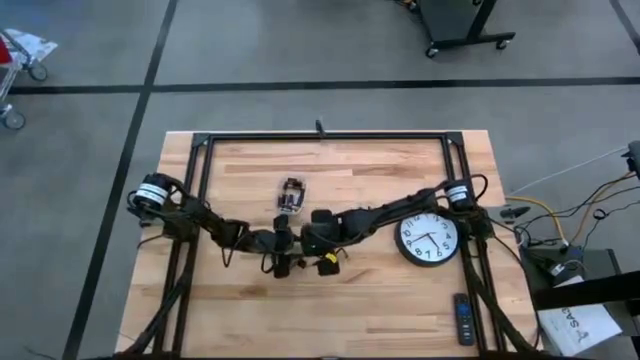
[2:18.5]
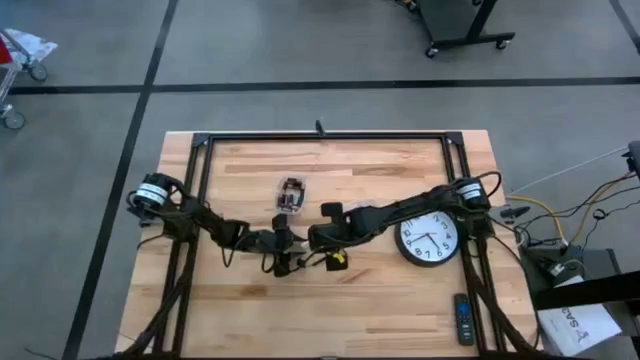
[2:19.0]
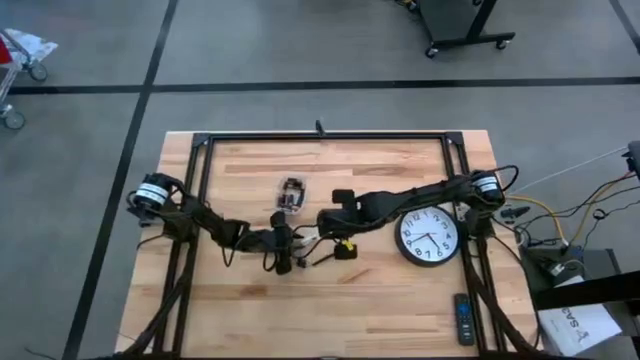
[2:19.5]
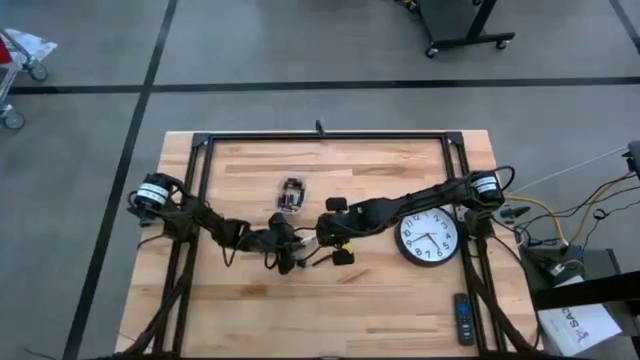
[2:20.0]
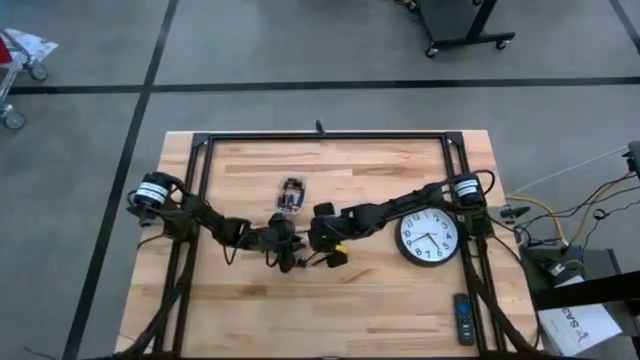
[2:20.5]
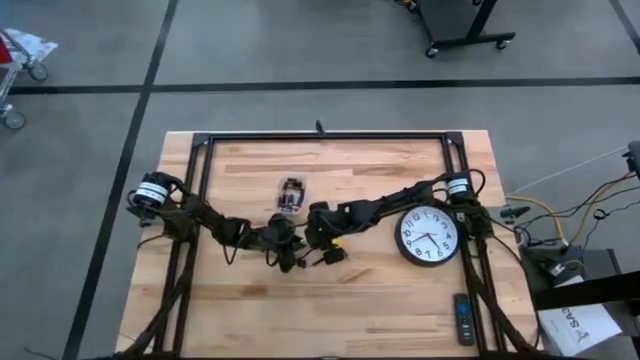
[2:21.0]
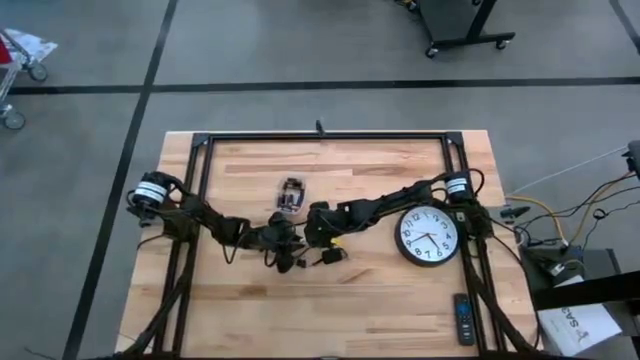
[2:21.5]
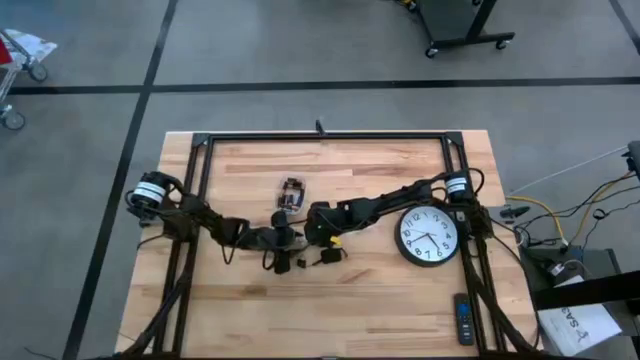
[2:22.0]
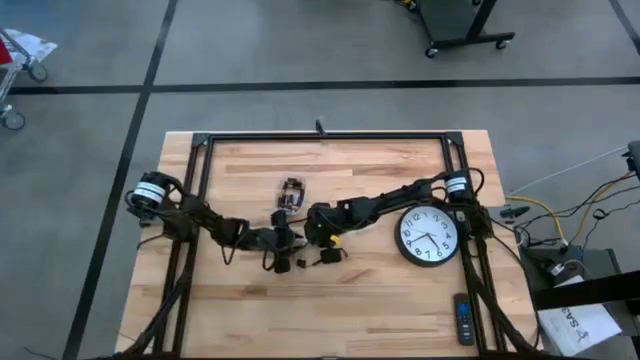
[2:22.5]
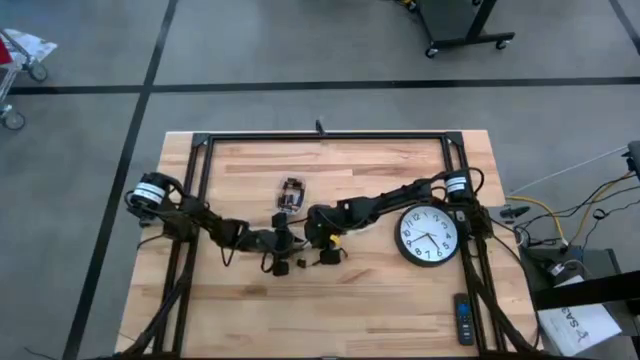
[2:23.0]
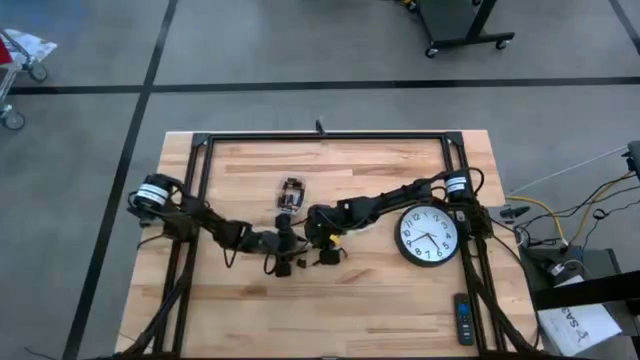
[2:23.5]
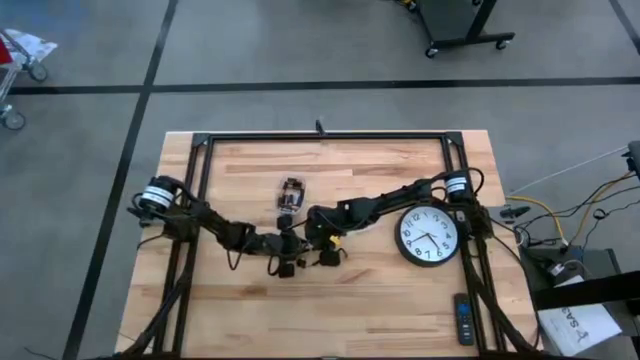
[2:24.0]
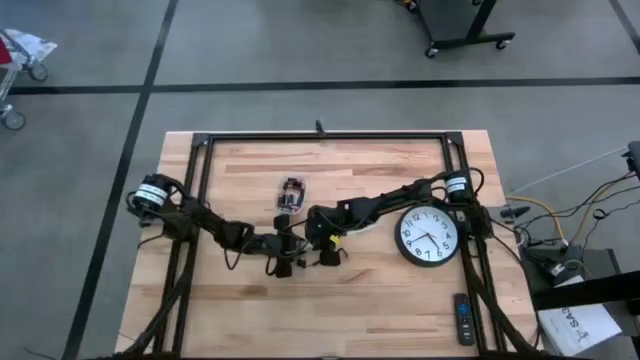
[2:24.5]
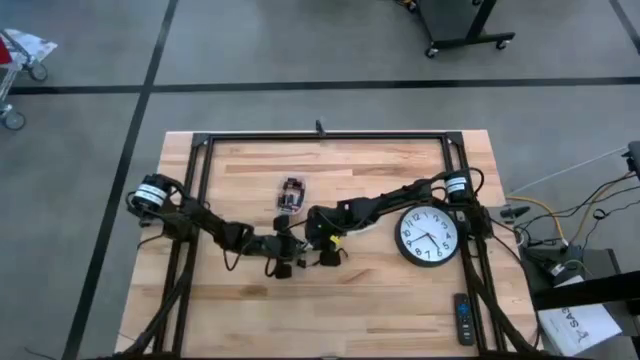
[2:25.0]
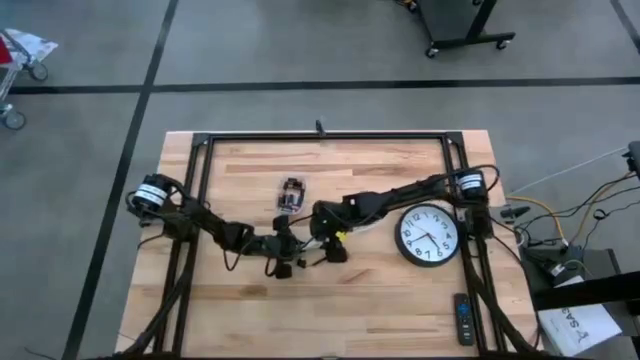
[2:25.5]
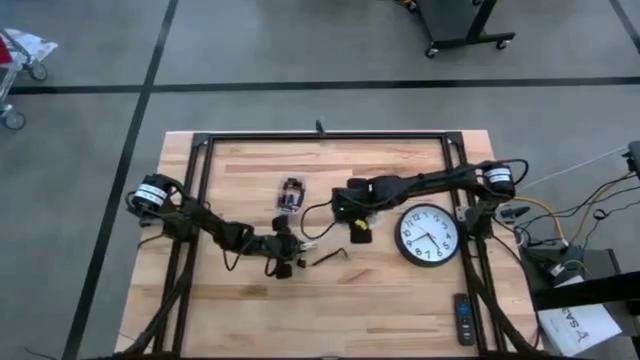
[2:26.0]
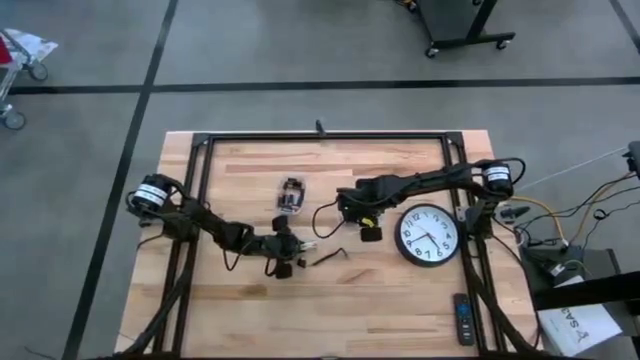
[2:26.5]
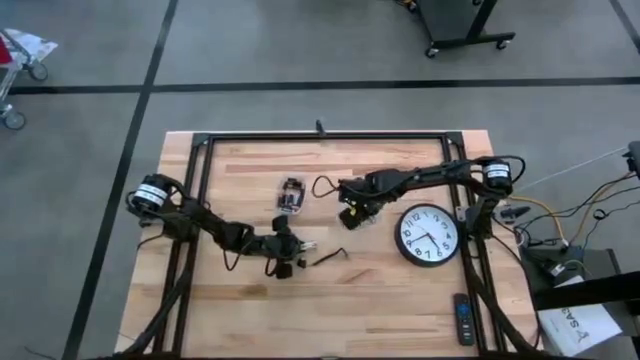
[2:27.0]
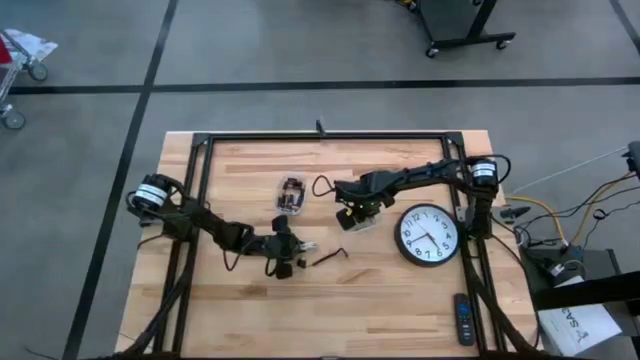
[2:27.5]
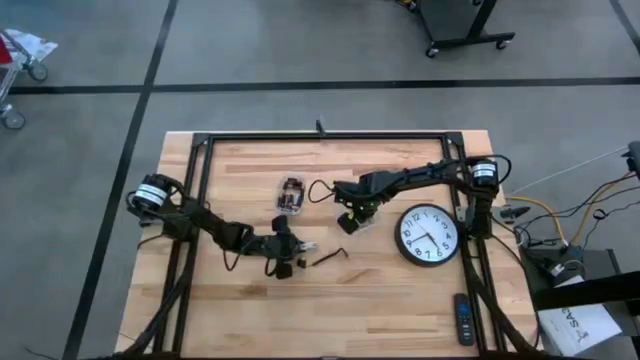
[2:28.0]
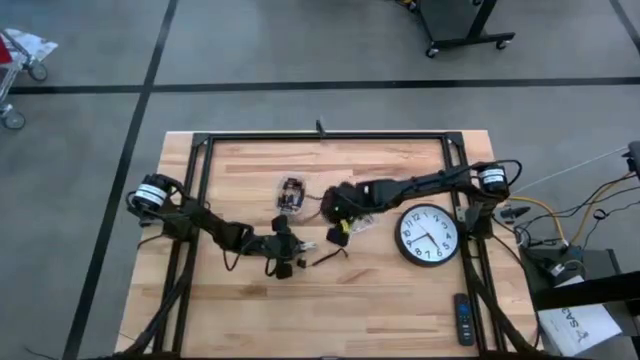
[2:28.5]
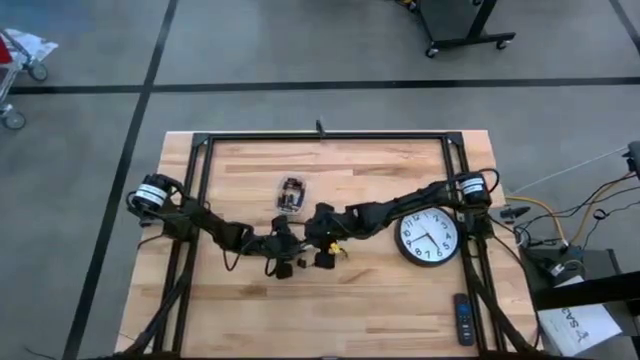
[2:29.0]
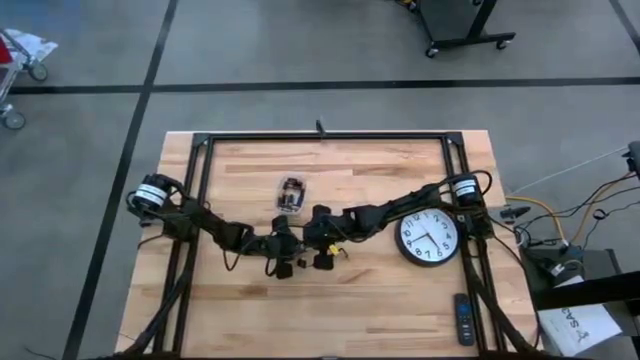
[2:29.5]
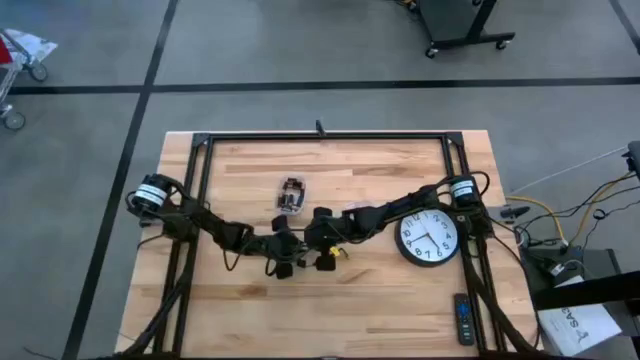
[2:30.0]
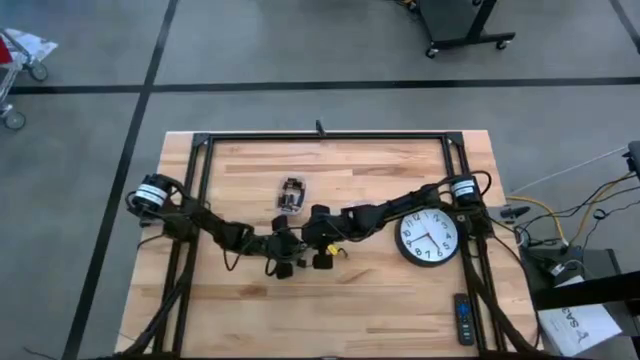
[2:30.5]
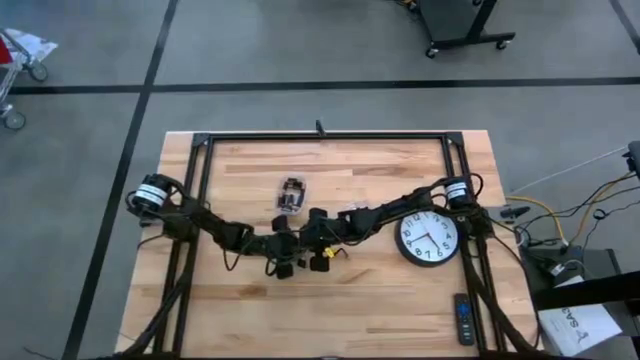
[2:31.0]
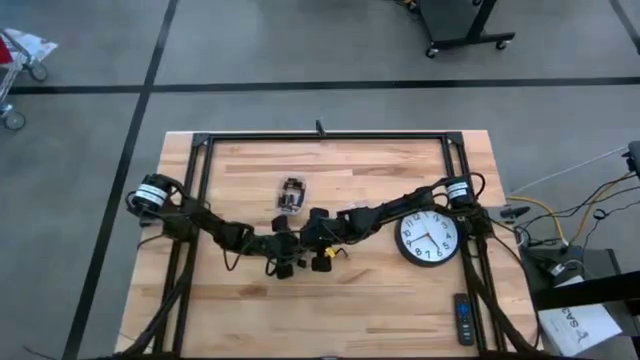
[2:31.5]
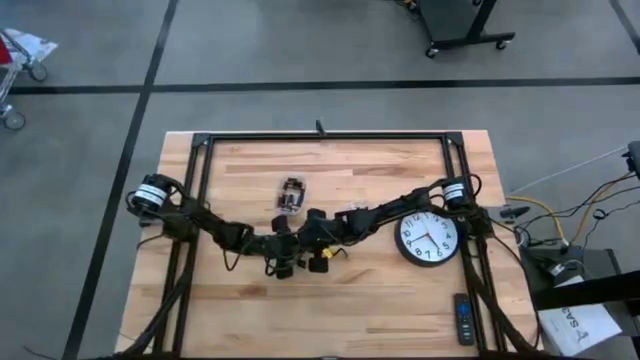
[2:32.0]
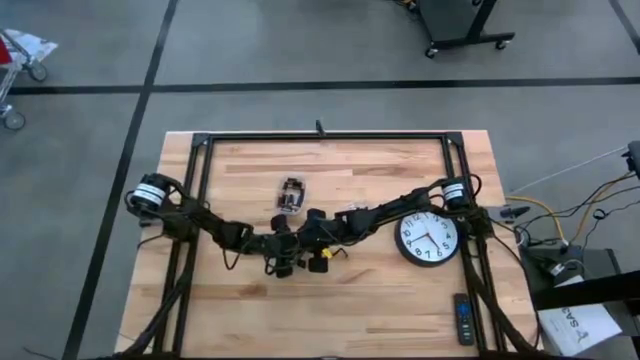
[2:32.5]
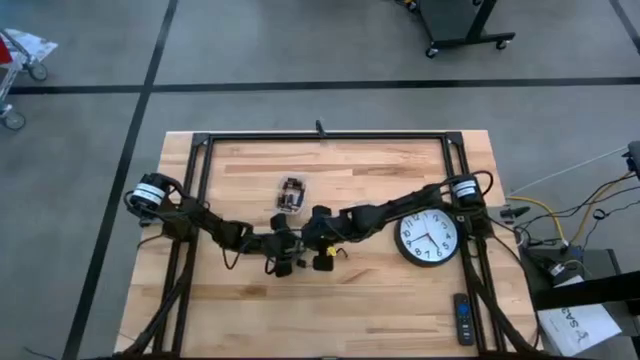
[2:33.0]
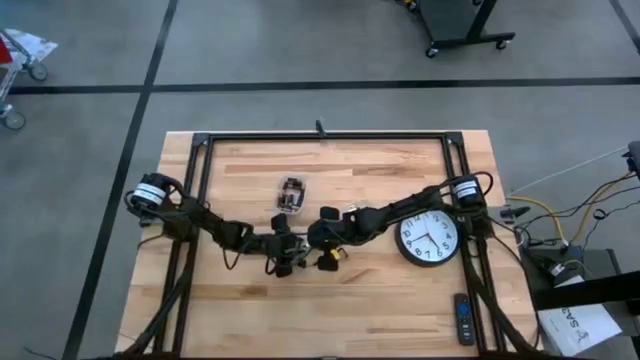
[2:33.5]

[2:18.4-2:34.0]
Task: Insert battery
Insert the silver battery into the flashlight's battery compartment

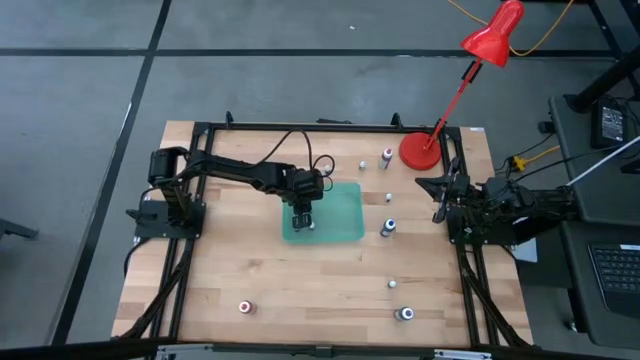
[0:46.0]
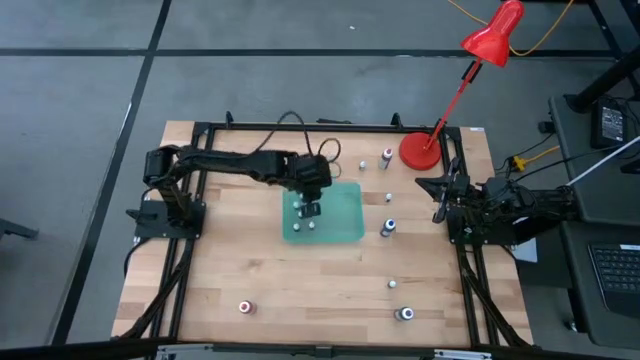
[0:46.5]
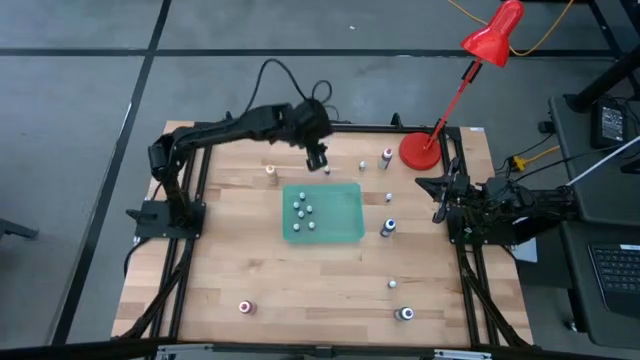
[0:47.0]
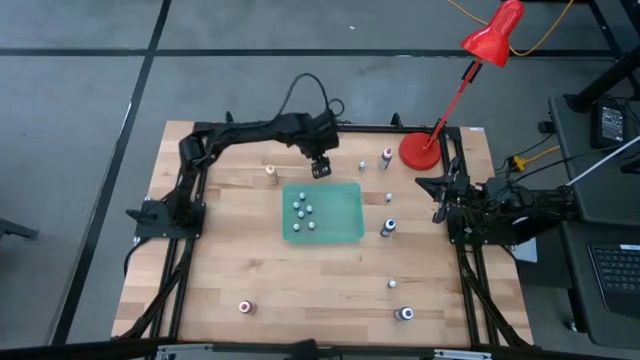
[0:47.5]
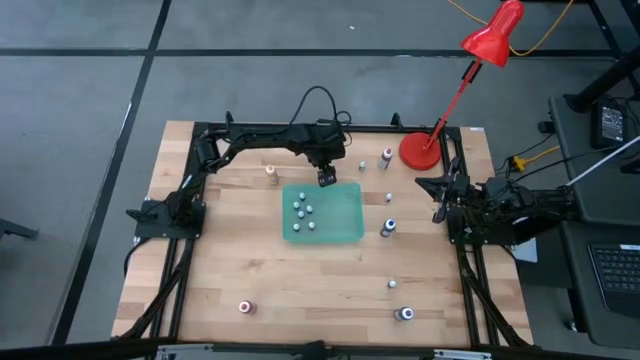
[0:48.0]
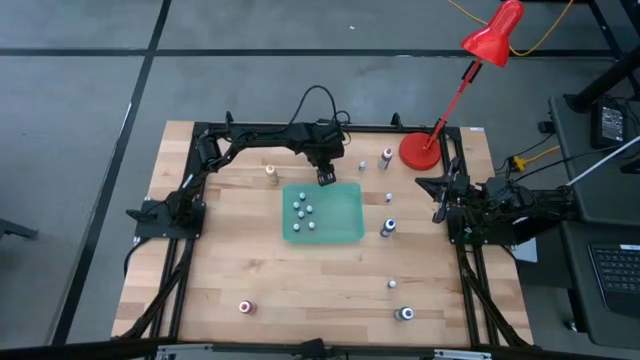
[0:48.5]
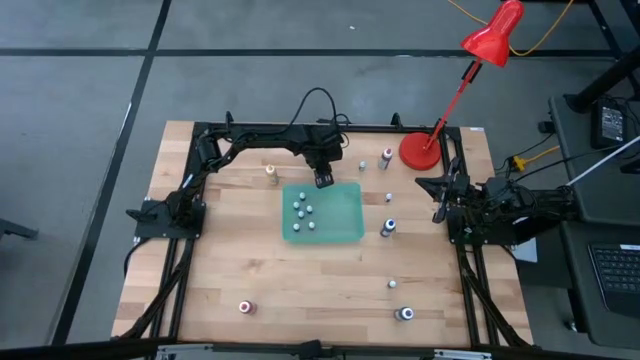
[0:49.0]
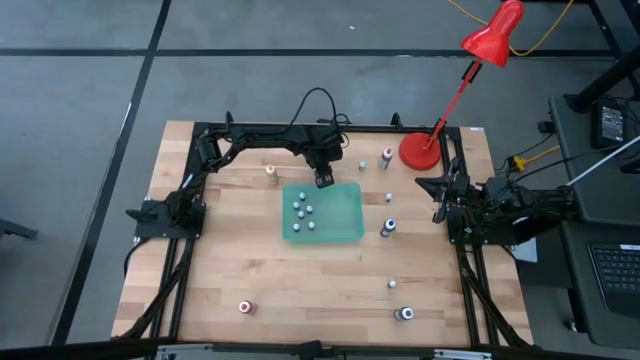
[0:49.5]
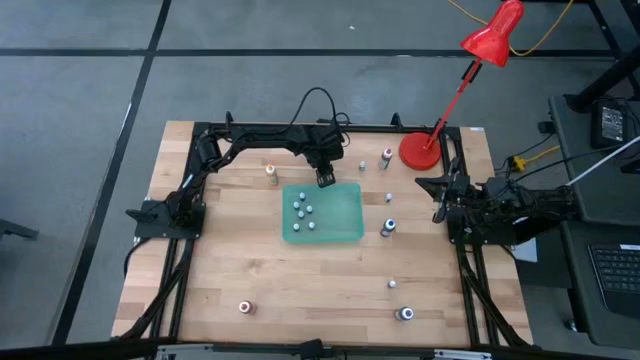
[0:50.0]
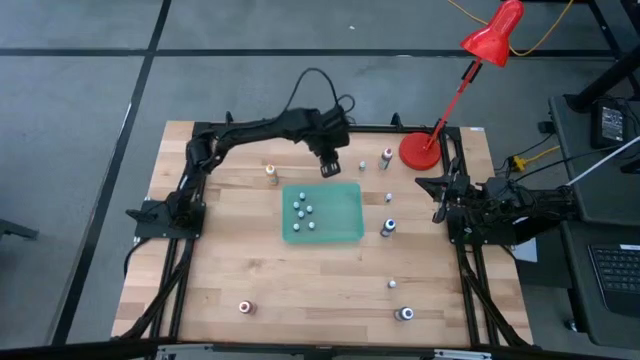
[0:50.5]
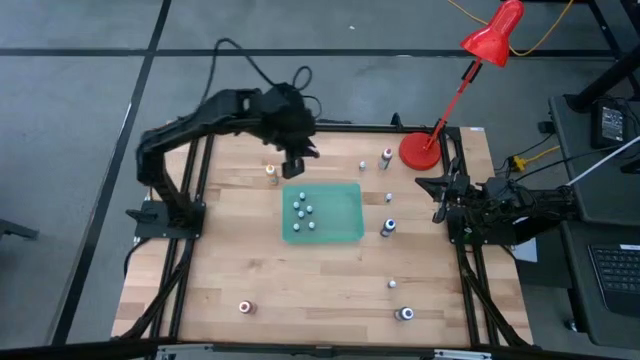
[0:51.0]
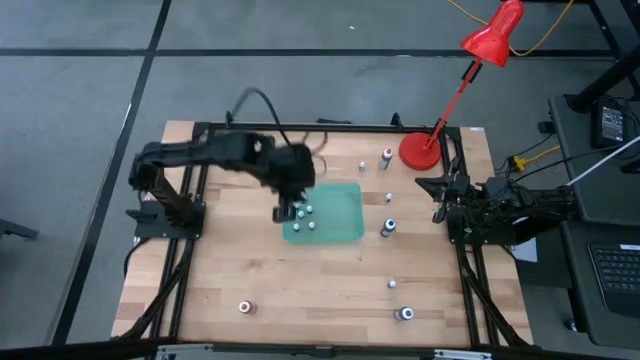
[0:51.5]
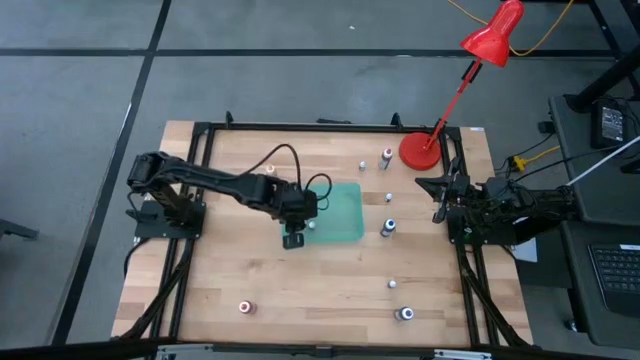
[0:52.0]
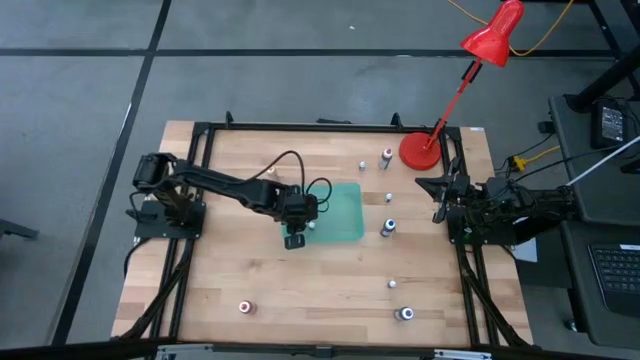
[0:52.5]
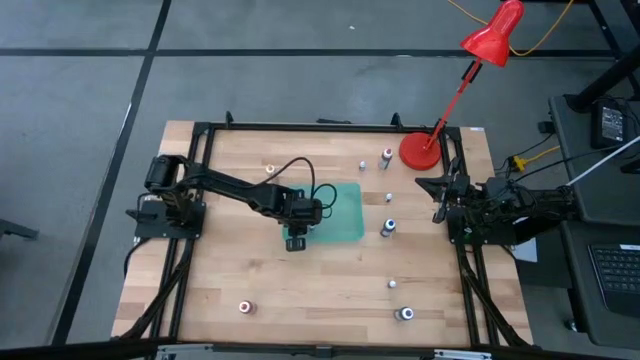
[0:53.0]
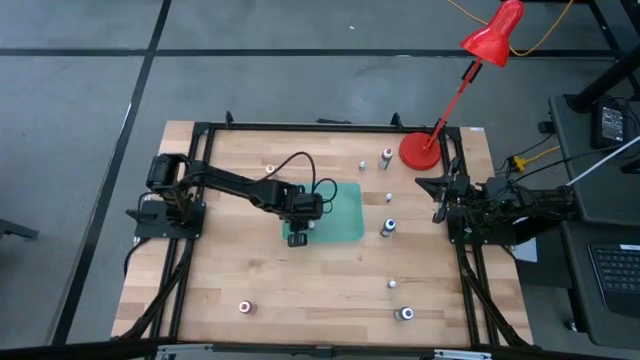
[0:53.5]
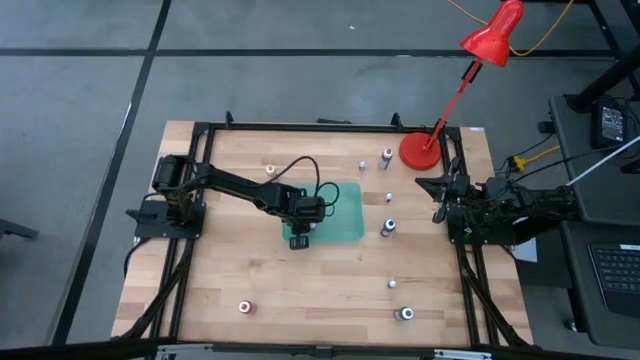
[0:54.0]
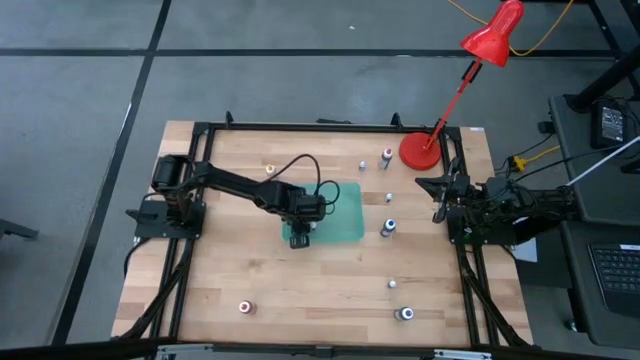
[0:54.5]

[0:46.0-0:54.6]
Task: Pick & Place food coloring
Put the small red food coloring bottle into the green bin
